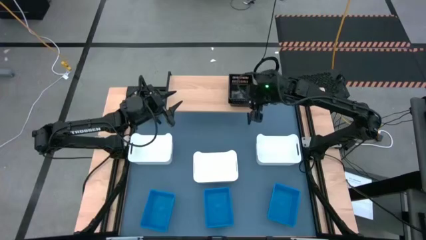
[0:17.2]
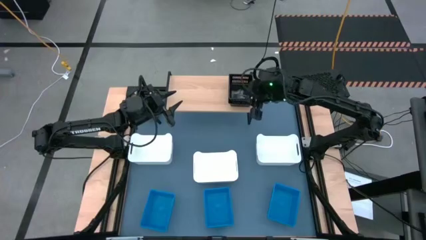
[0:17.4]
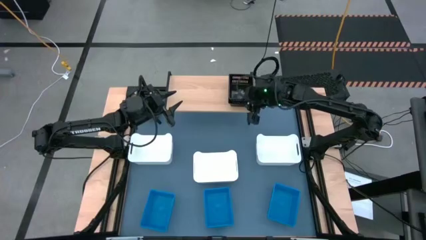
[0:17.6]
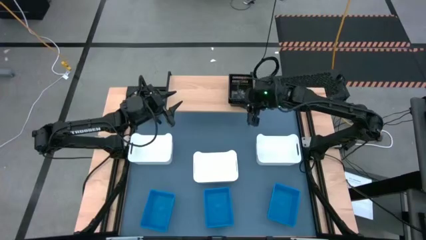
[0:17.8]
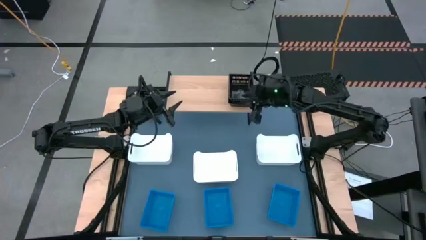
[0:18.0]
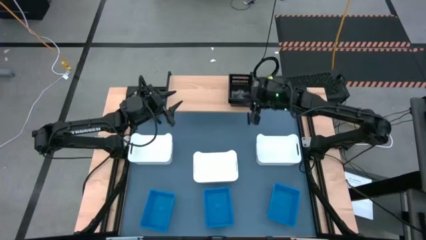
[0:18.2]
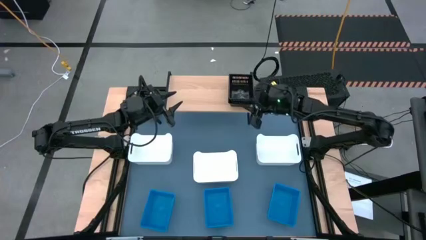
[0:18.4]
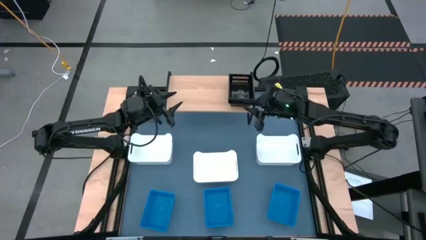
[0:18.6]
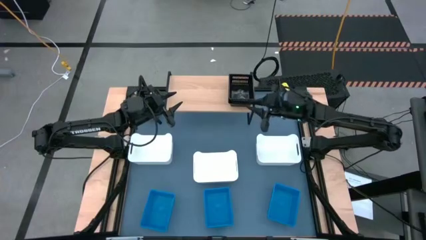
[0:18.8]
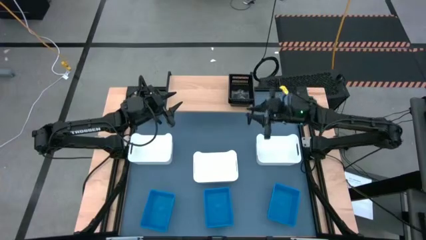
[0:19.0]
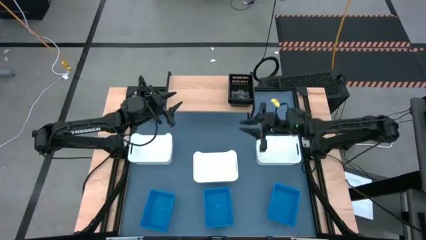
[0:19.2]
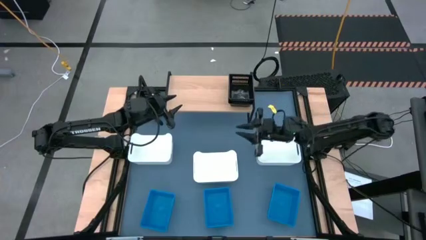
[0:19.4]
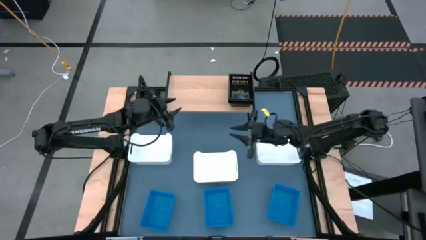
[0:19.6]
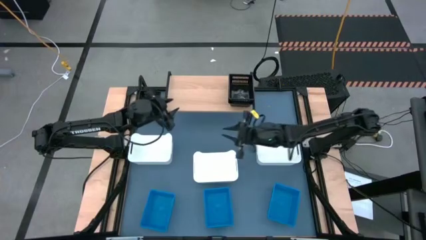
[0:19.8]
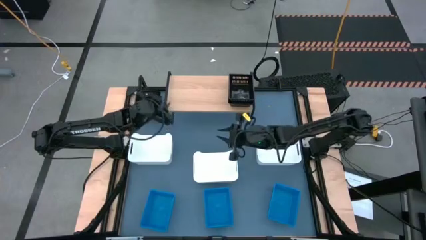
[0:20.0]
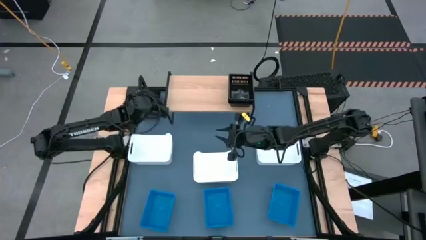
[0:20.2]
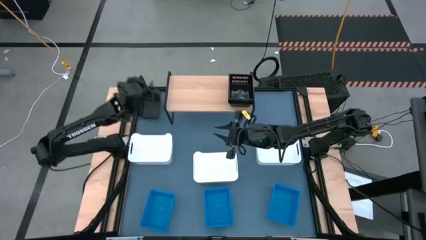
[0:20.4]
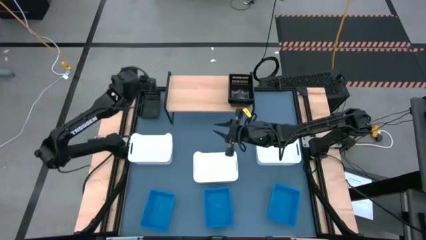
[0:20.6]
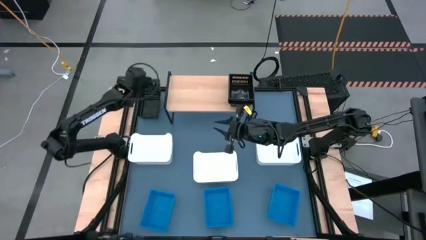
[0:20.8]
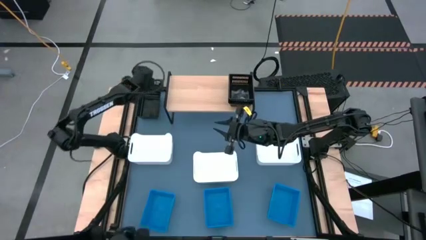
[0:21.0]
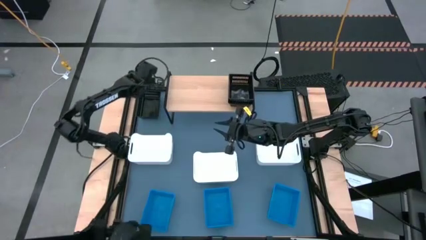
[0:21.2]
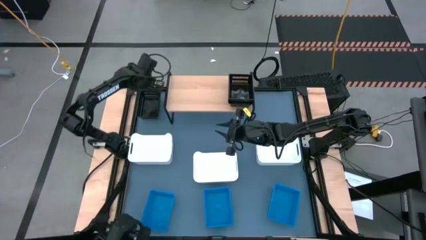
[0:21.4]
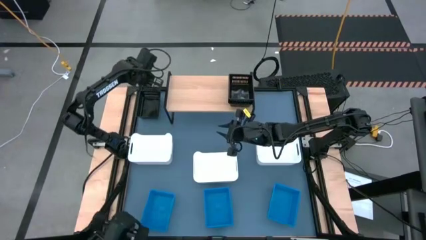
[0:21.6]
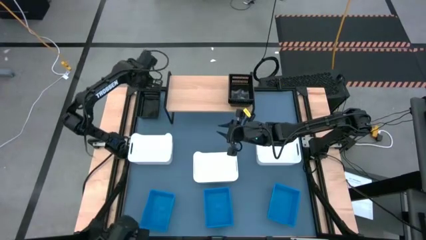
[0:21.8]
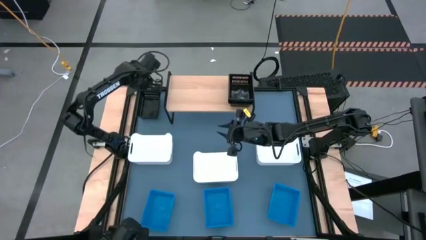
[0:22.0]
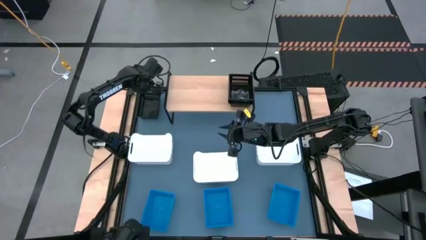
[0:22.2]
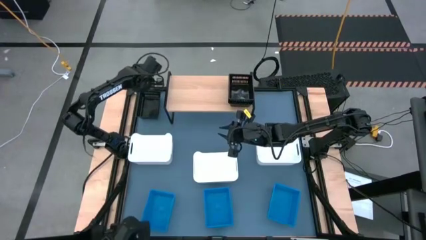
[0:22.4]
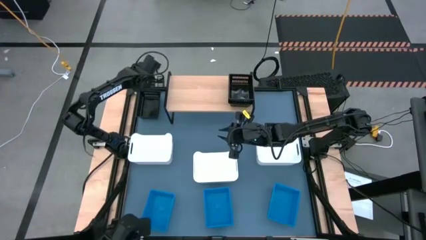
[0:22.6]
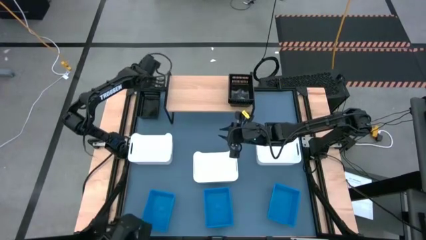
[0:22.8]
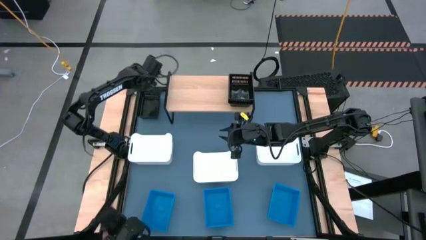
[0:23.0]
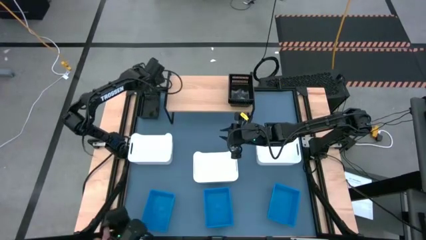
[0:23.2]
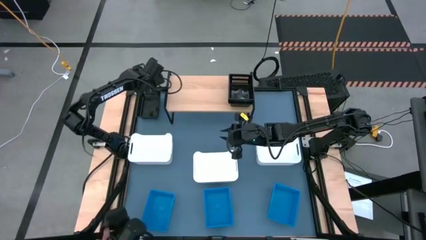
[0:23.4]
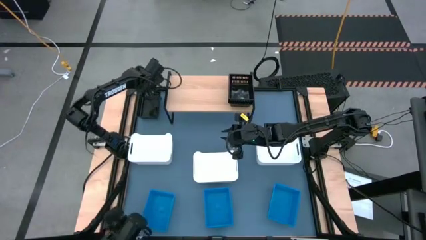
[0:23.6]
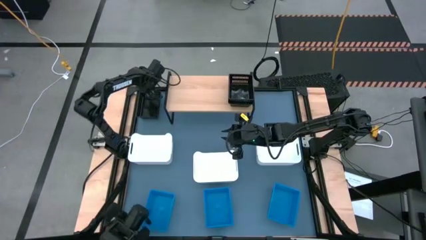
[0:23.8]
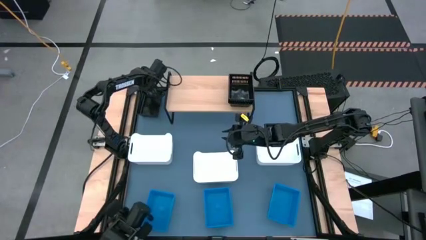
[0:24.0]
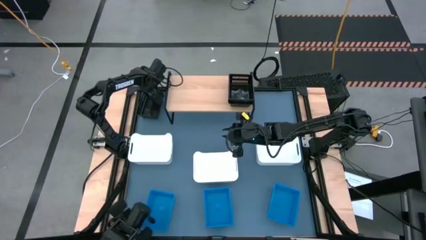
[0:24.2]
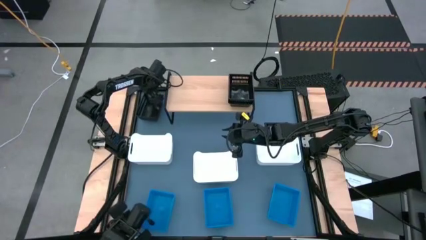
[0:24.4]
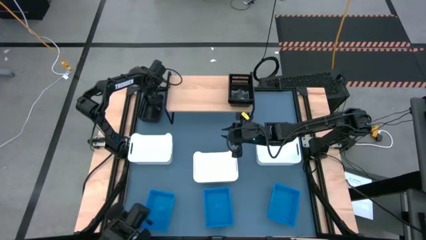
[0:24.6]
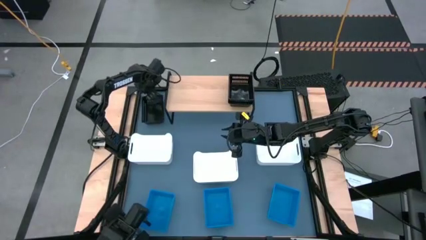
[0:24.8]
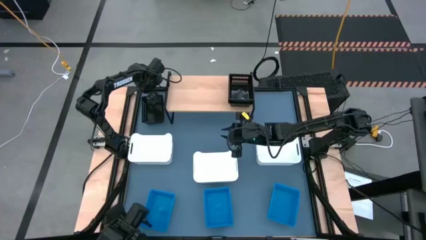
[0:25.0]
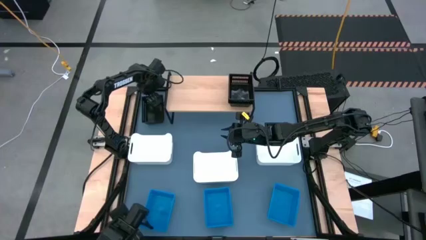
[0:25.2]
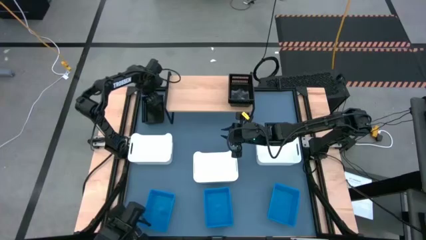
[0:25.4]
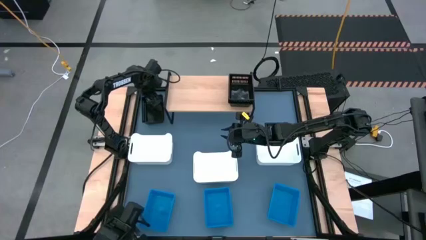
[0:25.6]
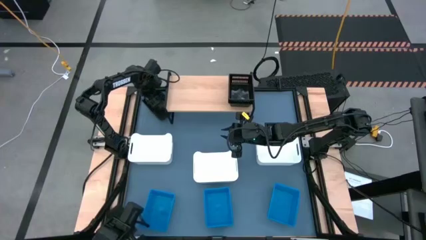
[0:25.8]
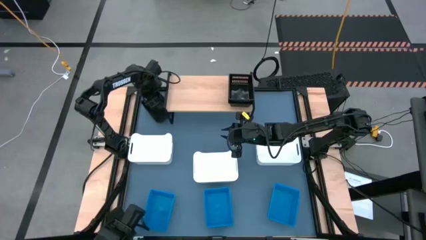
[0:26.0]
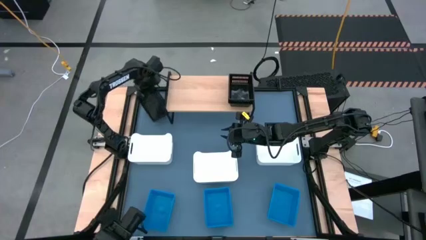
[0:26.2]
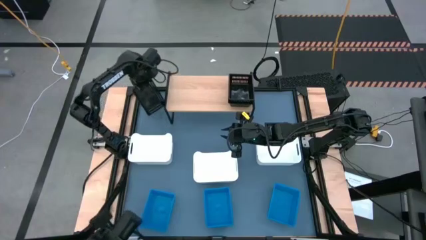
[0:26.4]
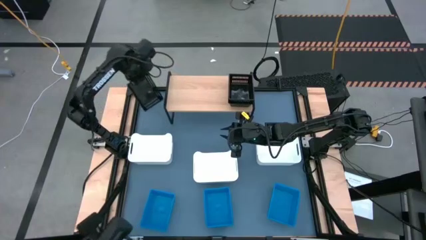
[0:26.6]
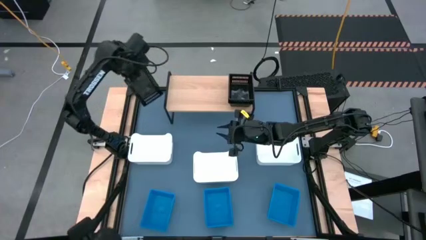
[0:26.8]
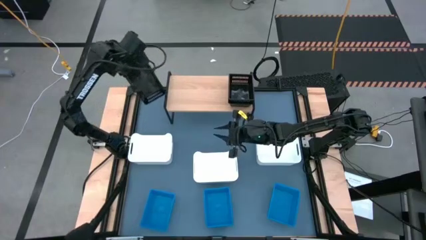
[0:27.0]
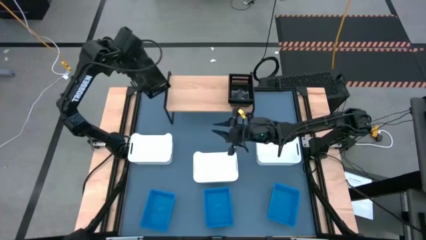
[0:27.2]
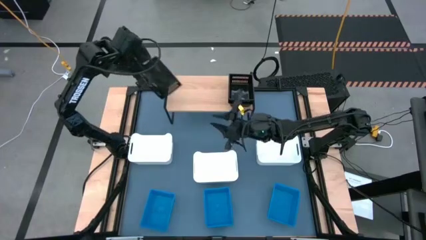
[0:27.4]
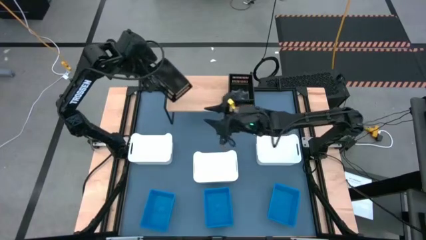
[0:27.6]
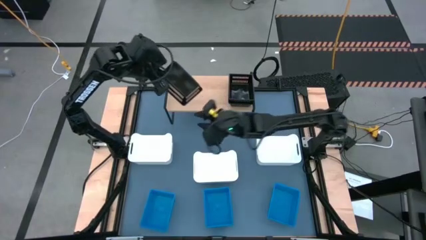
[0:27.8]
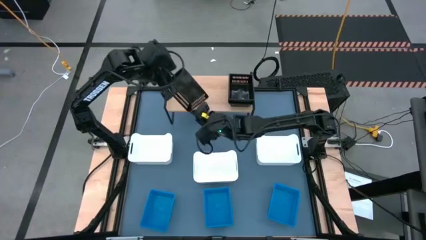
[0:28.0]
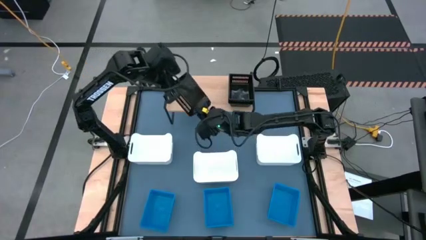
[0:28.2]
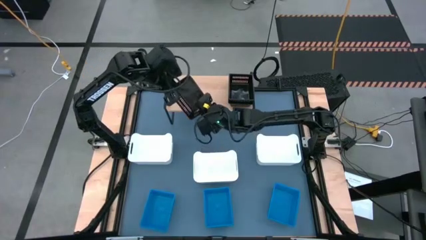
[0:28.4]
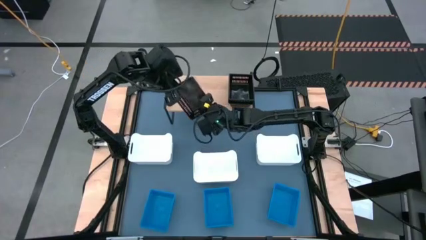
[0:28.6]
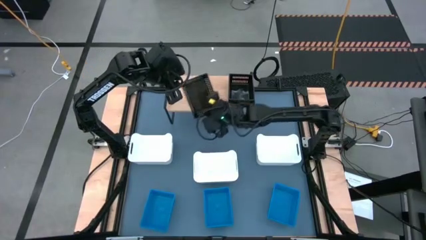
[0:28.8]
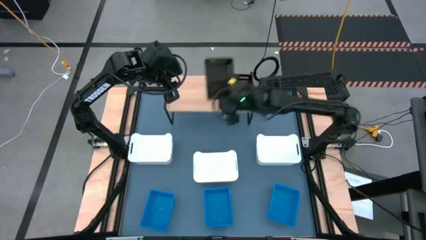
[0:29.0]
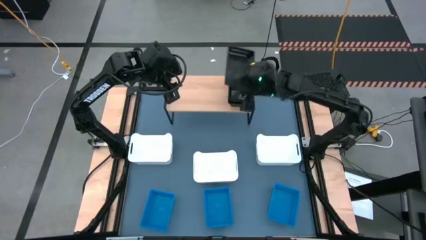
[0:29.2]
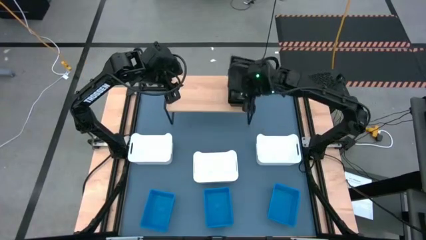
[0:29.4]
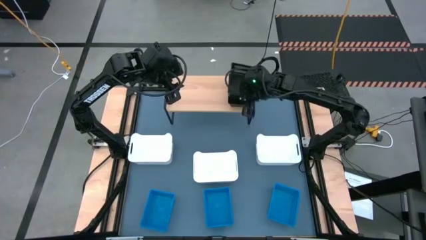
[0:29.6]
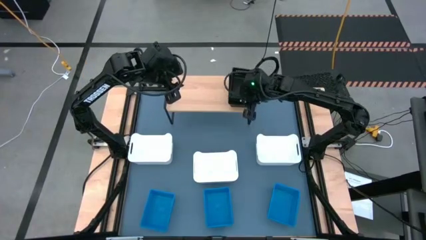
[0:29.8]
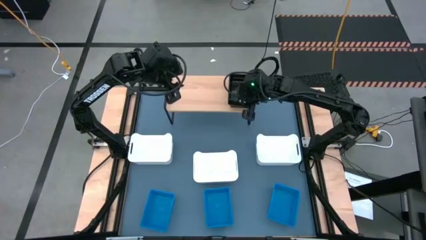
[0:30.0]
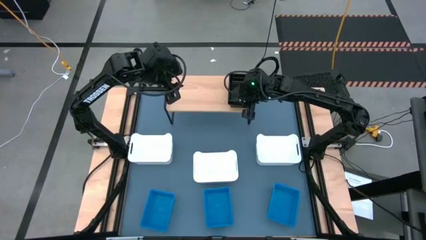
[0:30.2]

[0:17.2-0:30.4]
Task: Stack baskets on shelf by color
Stack the black bin on the black bin on the shelf
